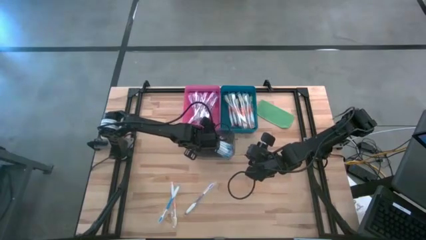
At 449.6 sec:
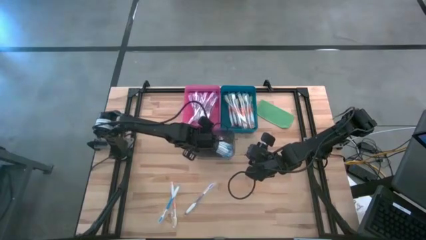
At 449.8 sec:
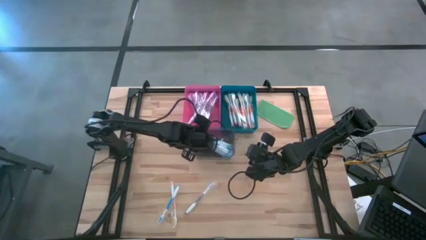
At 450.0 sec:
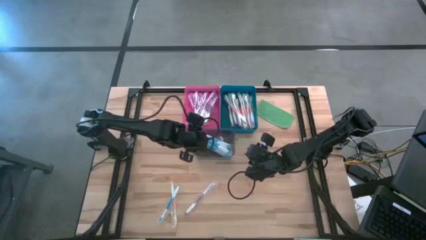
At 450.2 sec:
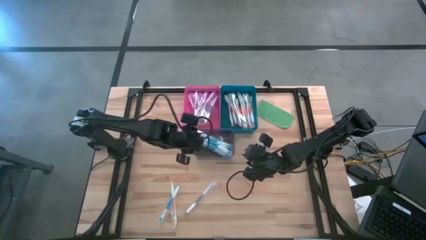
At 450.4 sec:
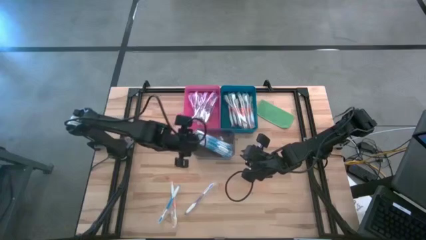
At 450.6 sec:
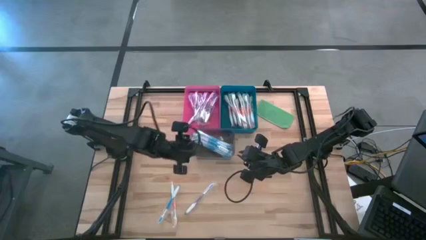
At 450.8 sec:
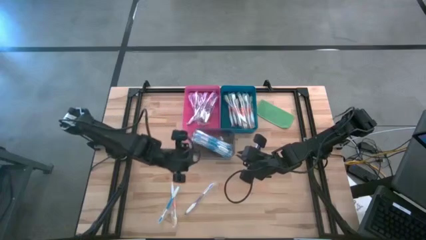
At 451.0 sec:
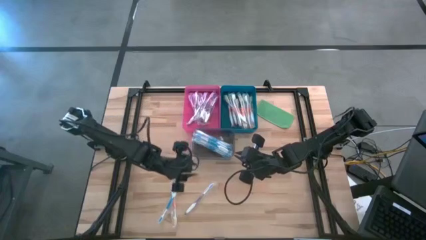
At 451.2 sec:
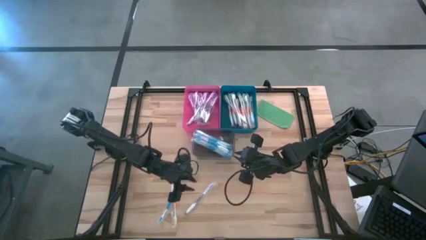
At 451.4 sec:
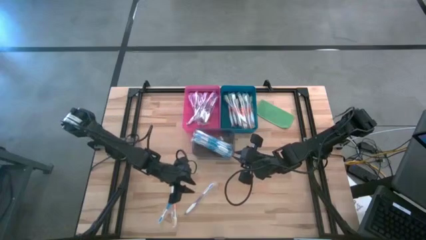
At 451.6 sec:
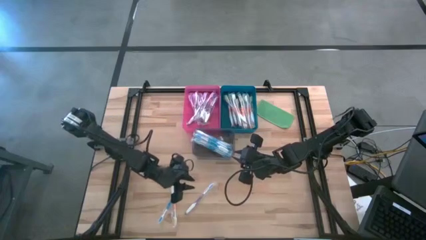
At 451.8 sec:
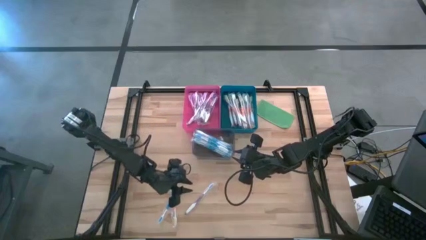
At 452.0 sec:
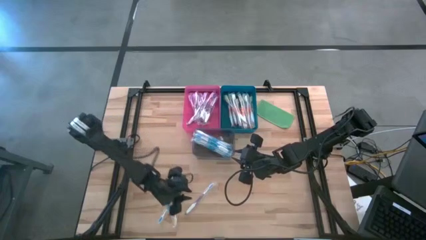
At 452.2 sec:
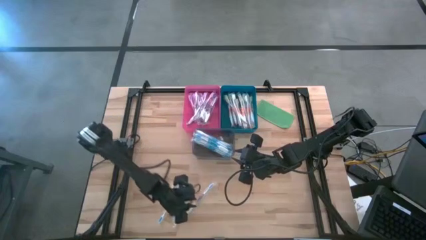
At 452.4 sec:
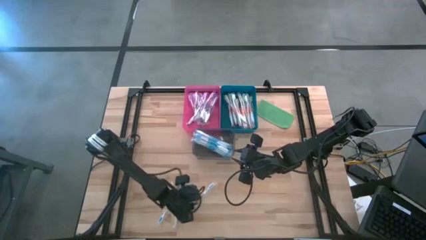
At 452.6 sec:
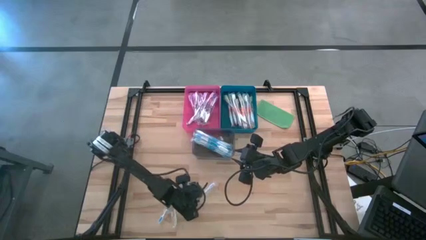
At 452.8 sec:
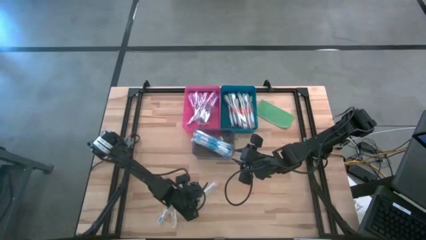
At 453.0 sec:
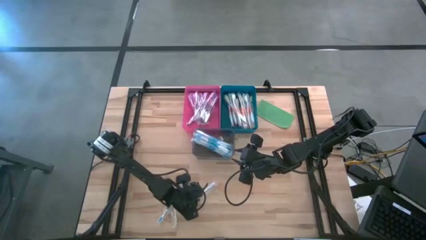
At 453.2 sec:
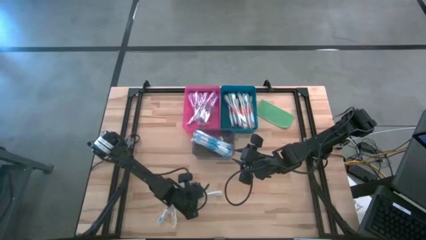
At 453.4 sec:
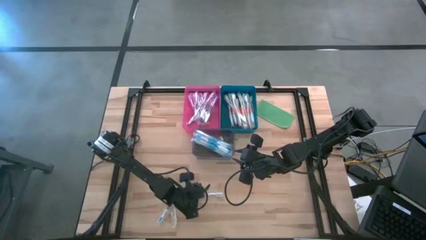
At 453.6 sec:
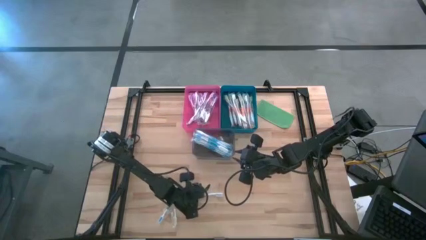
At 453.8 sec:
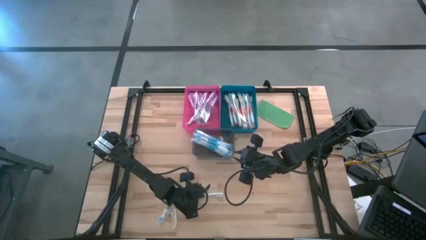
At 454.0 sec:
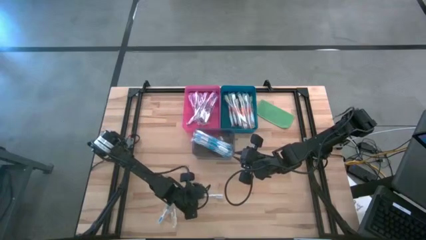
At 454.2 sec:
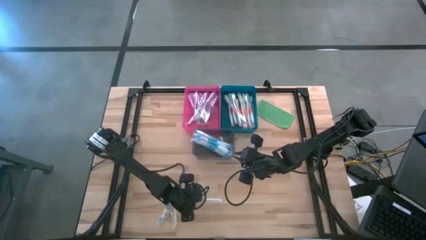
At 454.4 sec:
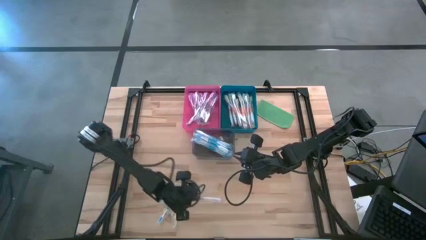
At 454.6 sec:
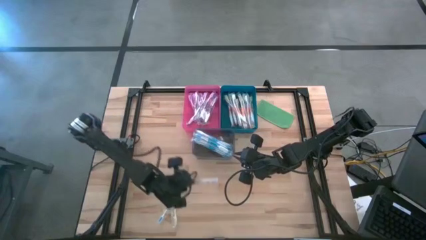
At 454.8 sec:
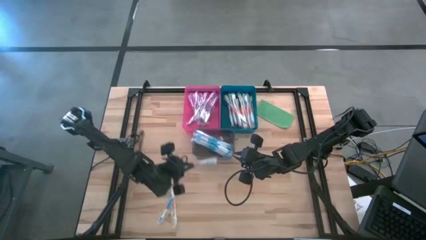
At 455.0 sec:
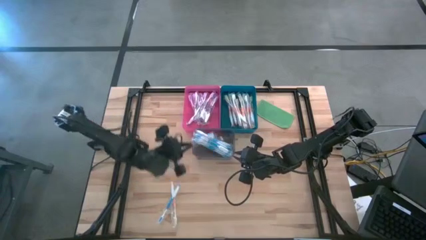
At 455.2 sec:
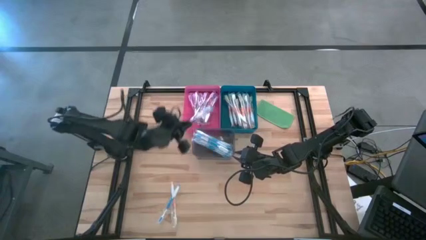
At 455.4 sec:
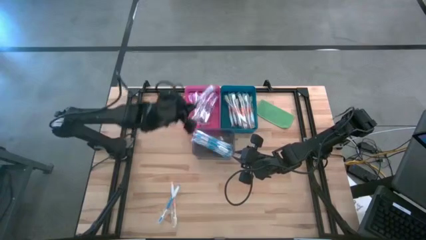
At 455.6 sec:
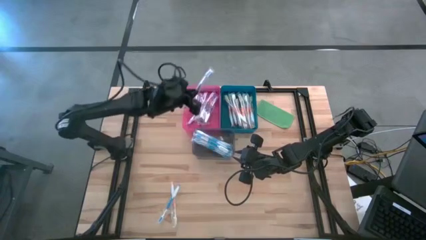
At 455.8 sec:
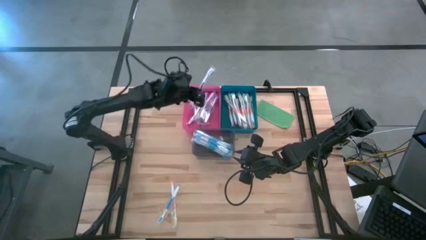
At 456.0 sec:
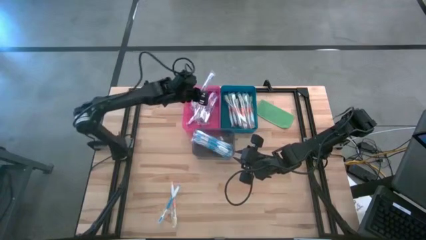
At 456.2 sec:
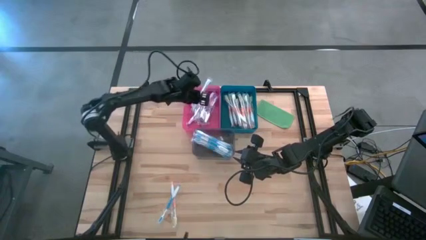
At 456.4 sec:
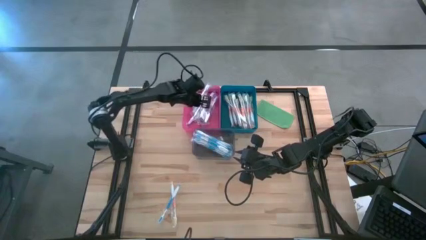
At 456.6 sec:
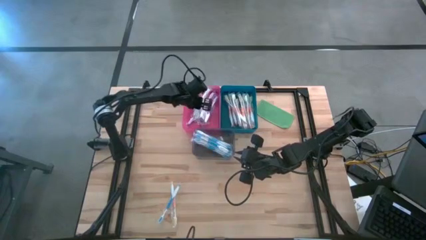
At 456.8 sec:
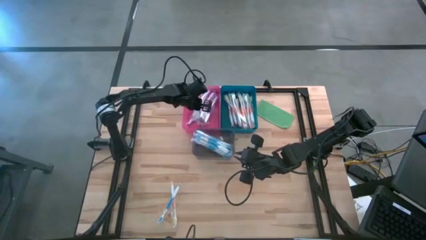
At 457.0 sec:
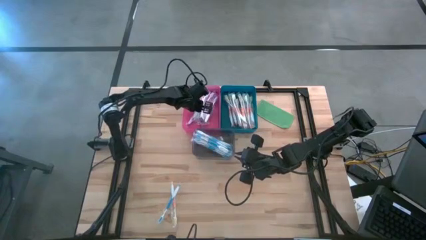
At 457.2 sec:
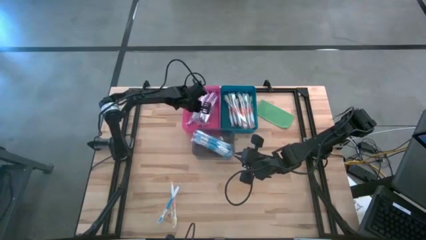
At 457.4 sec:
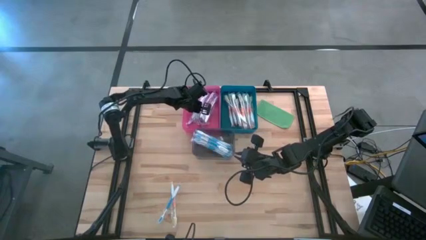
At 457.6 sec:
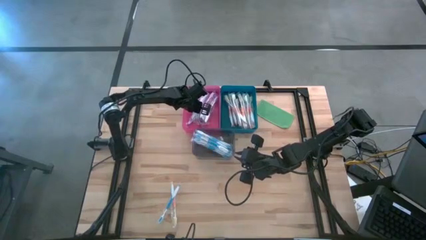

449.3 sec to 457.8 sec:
Task: Pick & Place Toothbrushes
Put the purple toothbrush into the pink bin

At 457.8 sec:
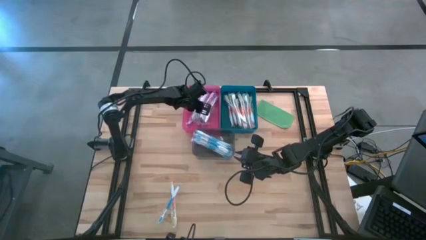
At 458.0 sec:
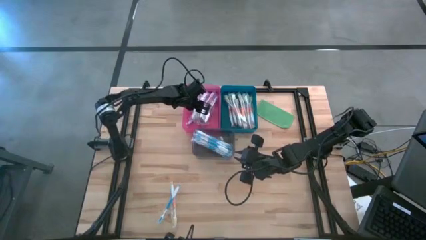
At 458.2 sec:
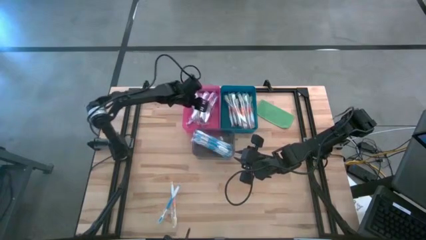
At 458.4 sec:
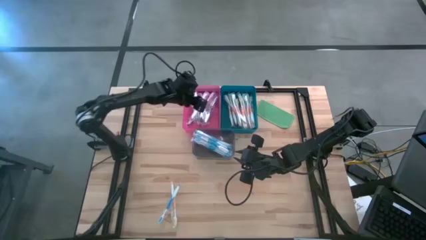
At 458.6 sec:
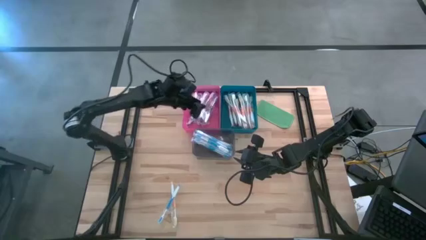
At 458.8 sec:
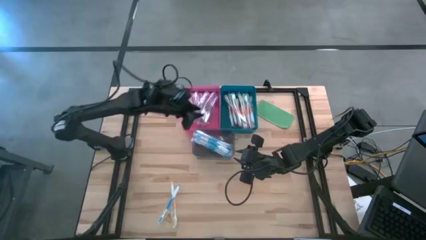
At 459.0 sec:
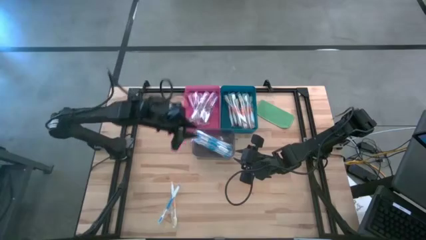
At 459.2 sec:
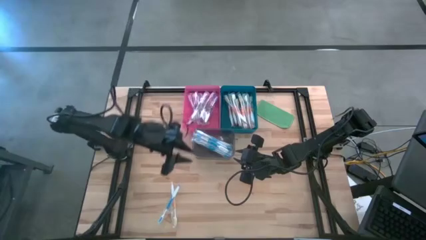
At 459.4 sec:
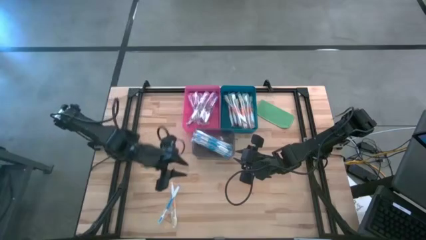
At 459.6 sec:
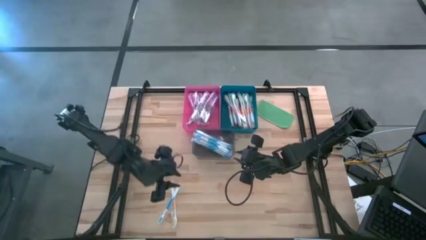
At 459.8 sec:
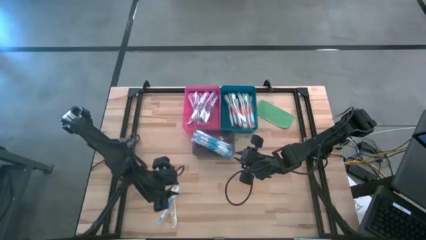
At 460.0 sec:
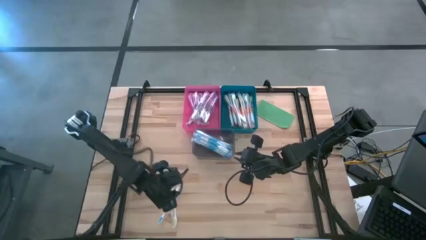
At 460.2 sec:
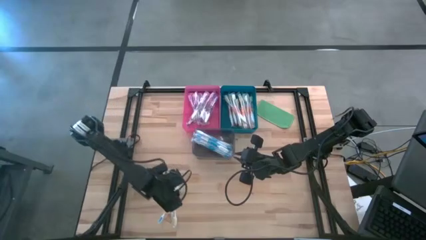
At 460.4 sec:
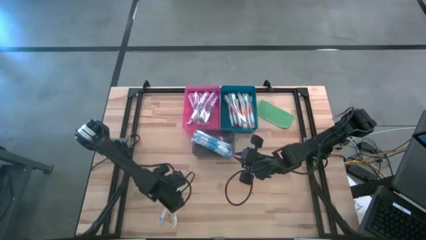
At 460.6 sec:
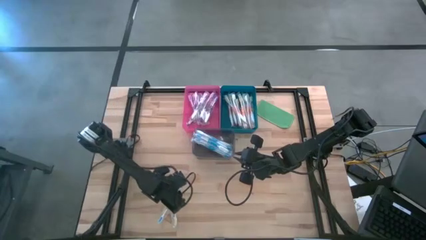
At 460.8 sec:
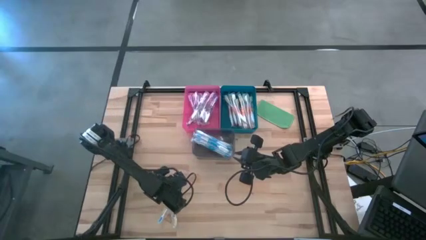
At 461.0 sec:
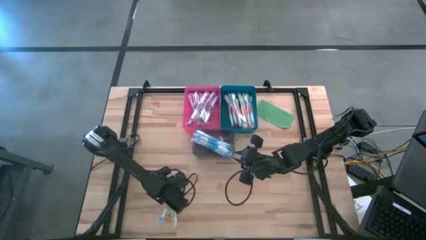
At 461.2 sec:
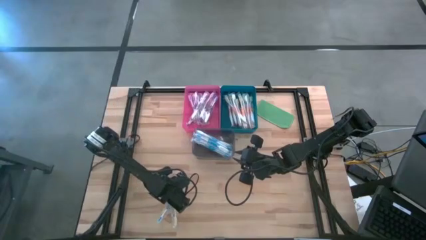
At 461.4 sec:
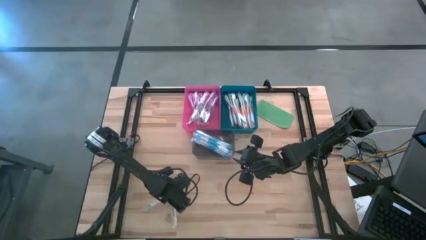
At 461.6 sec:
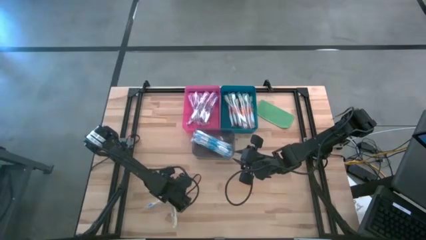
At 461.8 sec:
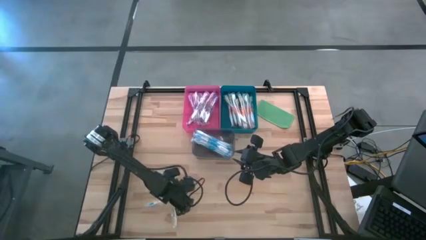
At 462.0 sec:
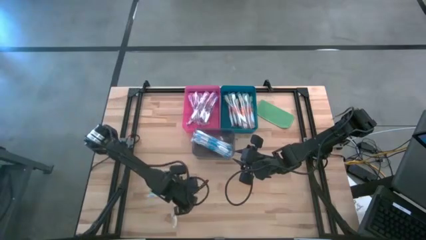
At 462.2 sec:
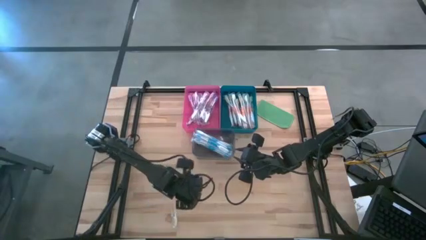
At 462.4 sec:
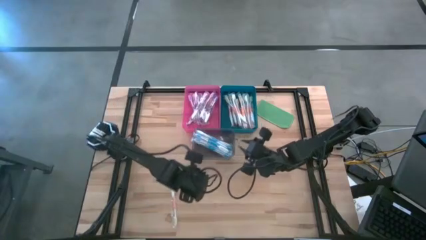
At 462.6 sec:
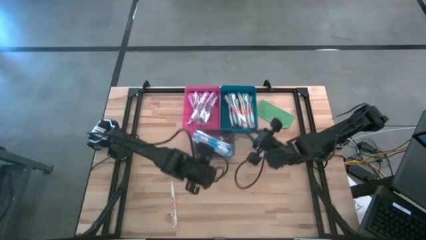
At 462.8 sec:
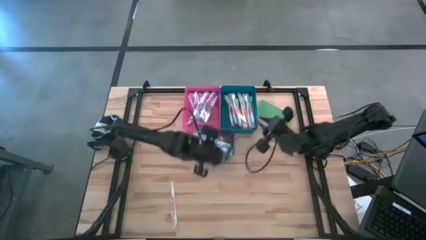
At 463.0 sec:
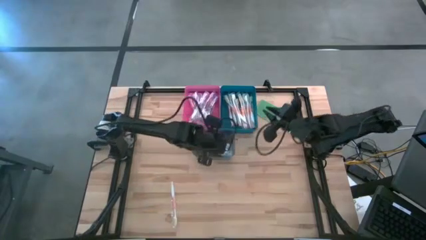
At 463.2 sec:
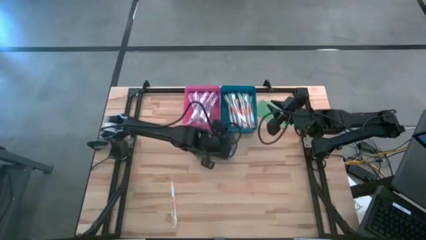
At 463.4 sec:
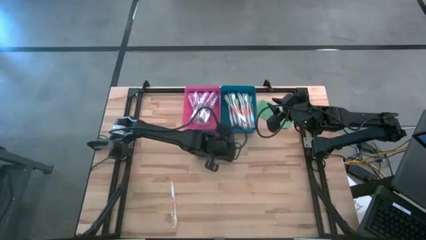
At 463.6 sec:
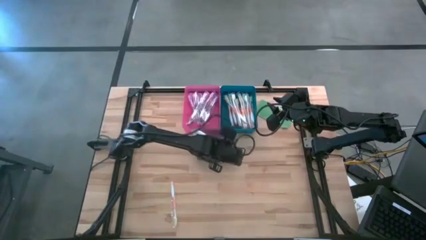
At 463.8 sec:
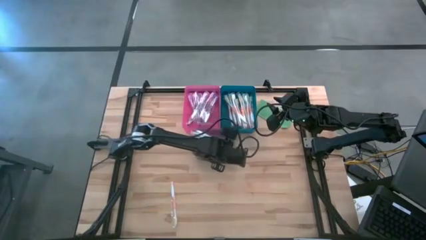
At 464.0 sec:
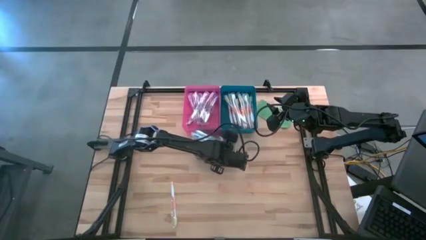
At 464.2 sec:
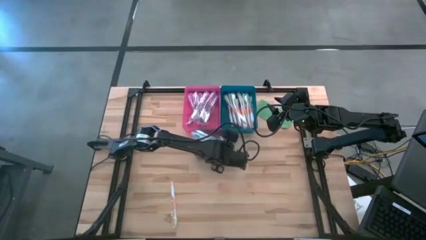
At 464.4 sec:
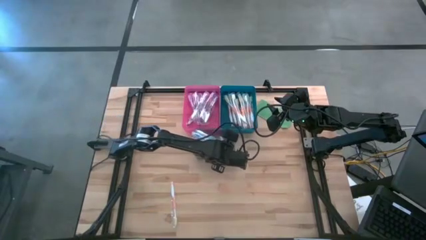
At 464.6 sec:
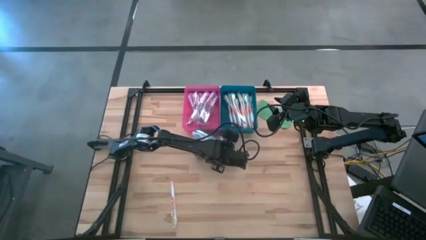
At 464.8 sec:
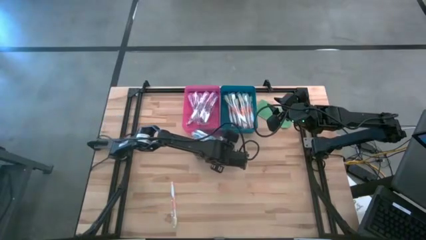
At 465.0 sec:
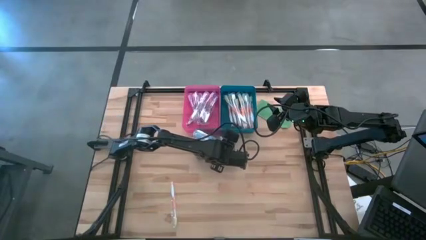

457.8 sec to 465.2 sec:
Put the blue toothbrush into the transparent gray bin

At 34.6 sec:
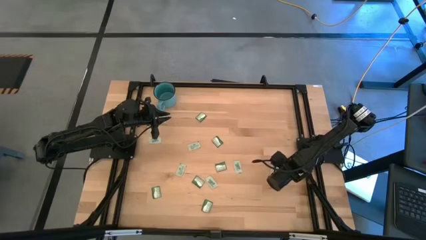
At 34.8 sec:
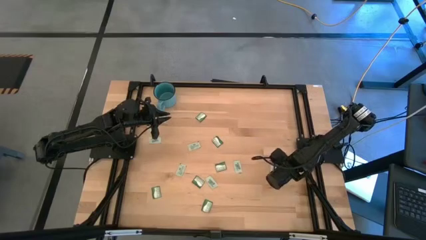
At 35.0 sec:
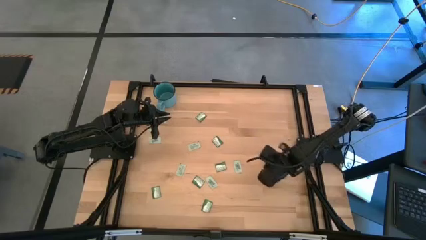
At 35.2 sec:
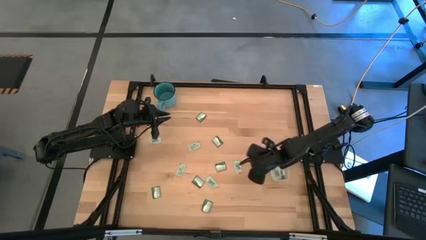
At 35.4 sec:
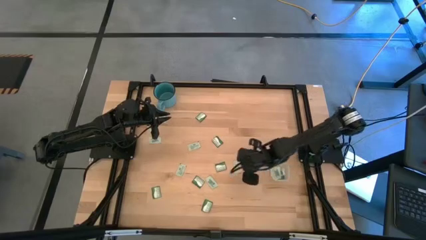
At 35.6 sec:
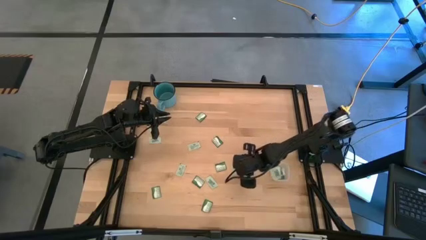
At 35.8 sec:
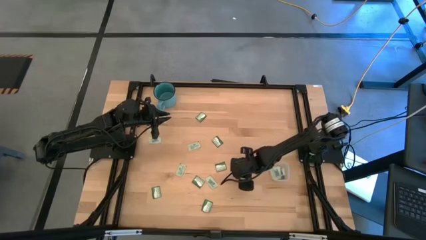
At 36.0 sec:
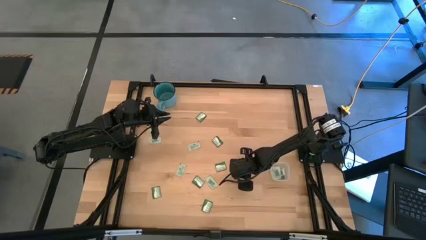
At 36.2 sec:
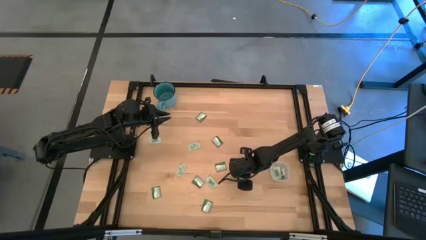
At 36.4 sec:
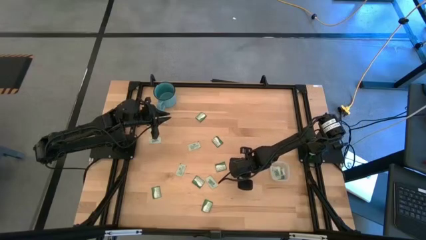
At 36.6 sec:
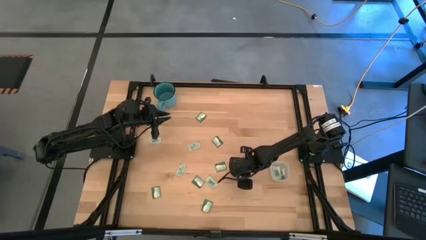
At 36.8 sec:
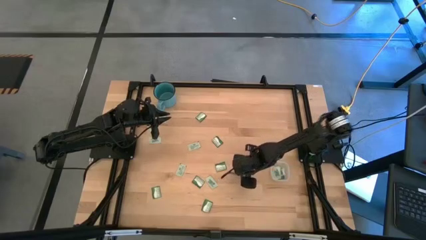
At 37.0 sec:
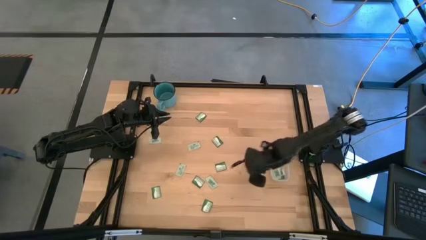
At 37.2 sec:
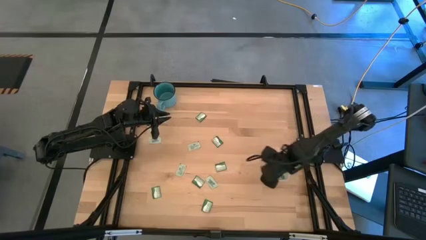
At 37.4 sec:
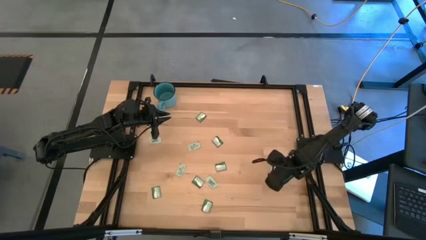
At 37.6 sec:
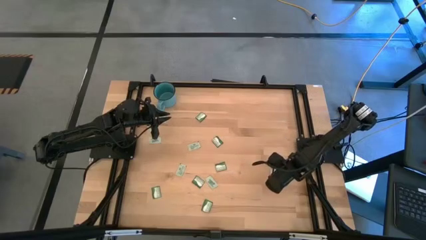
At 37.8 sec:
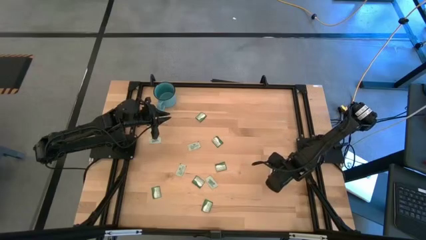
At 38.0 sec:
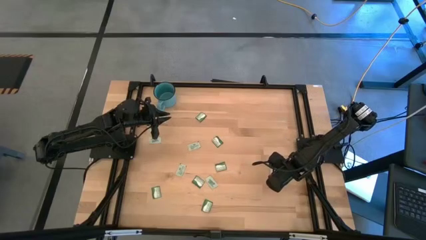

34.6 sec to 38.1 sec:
Task: Pick and place items into bin
Put the white stevia packet into the transparent bin
